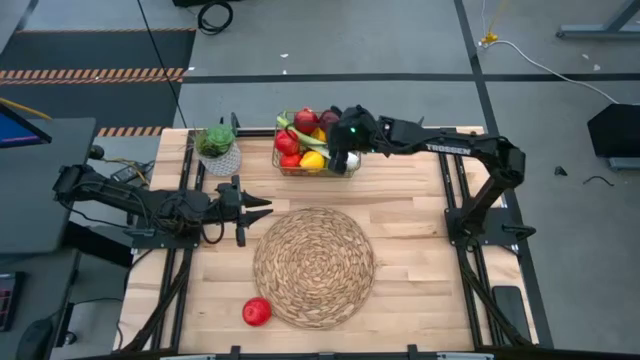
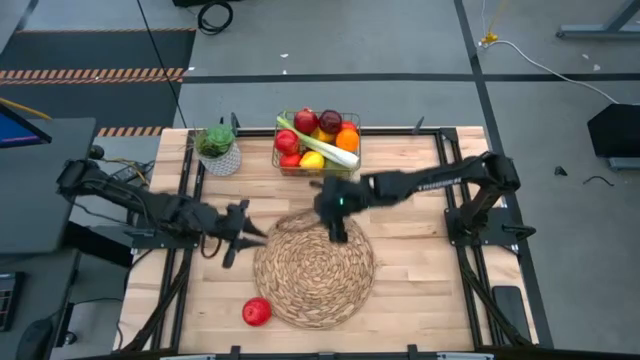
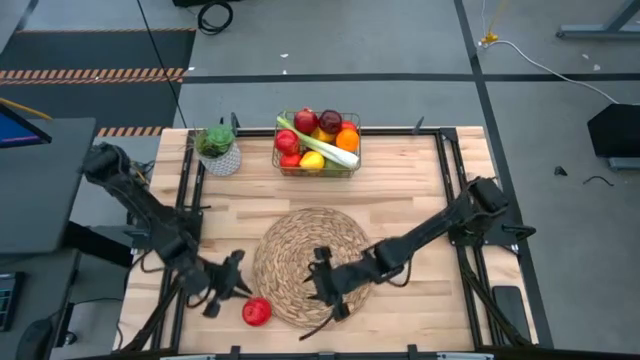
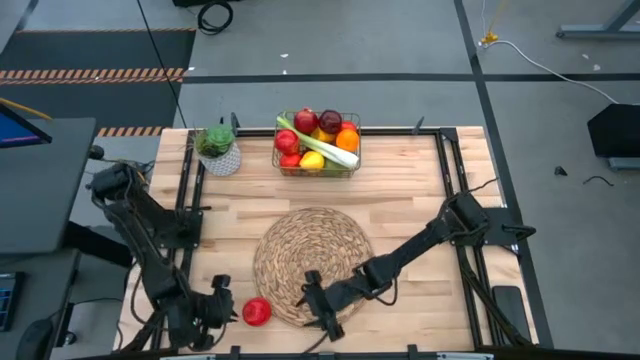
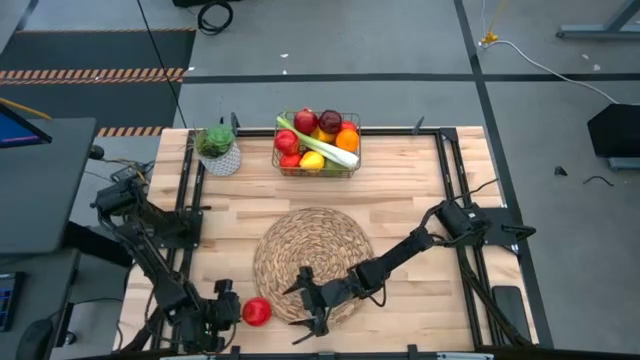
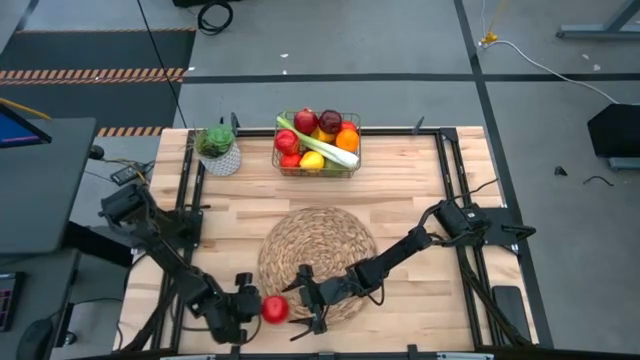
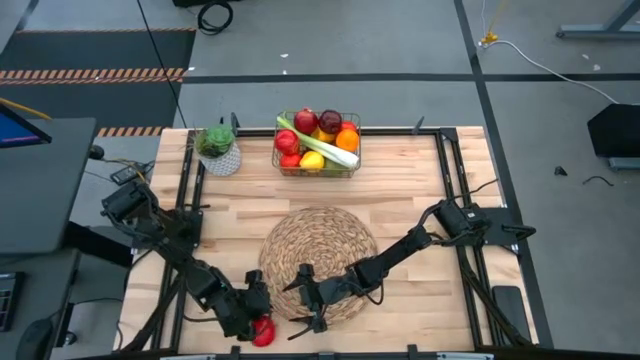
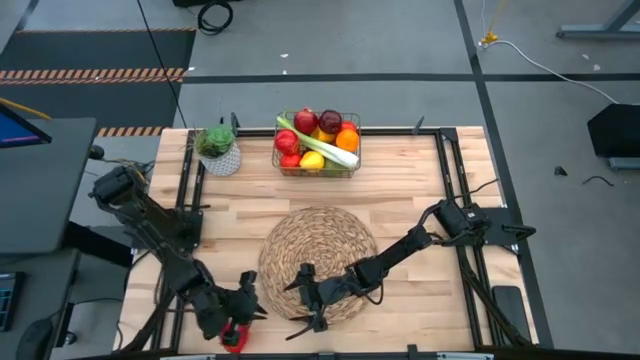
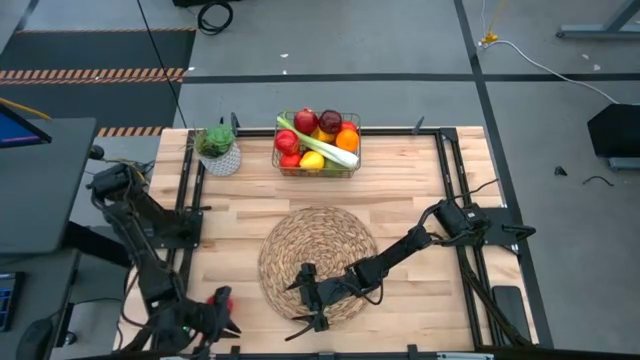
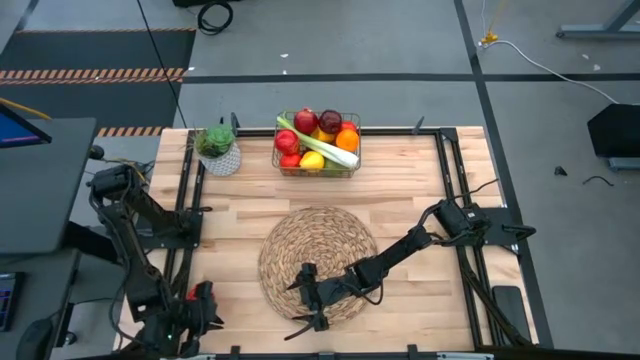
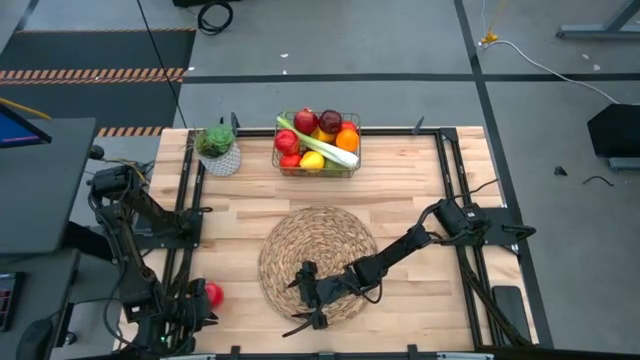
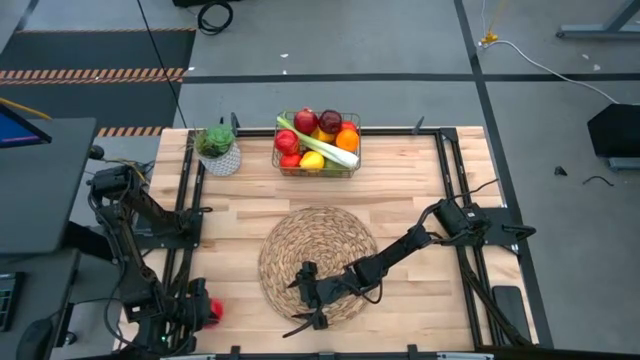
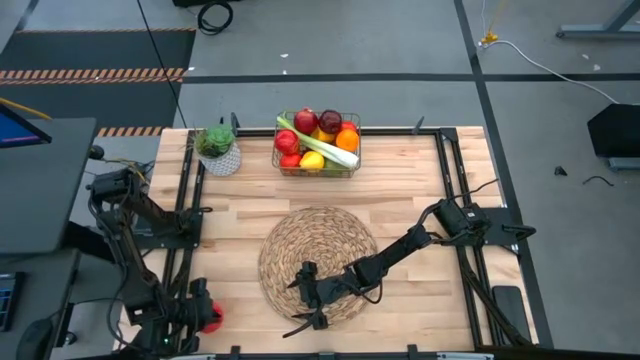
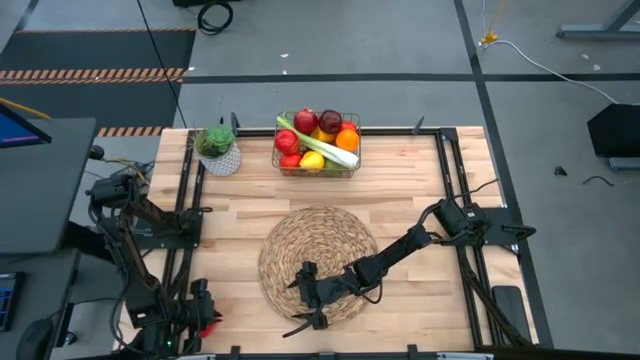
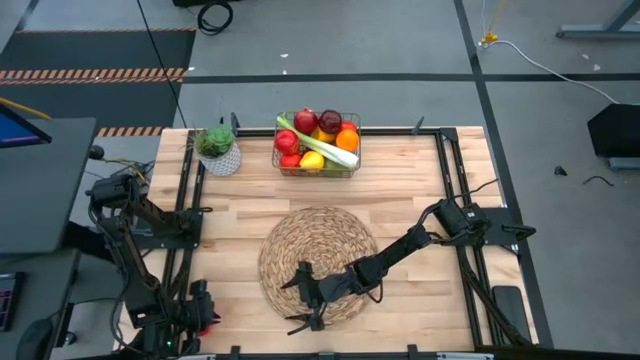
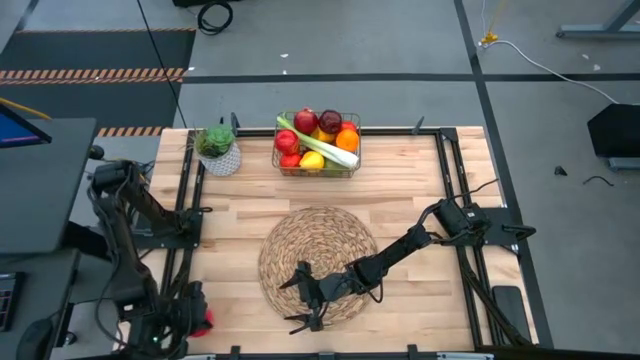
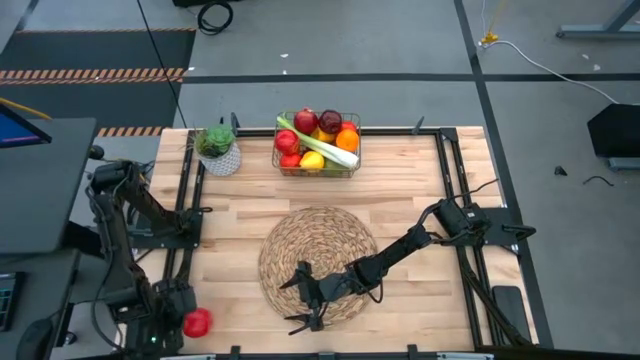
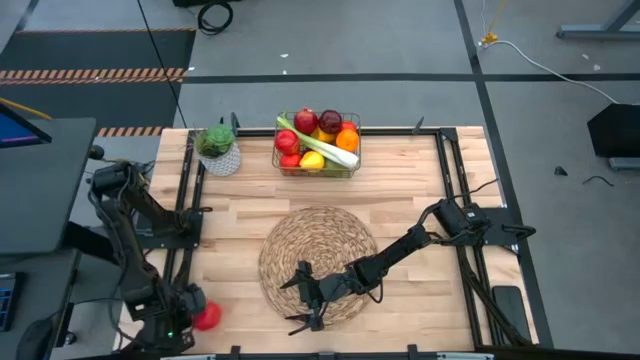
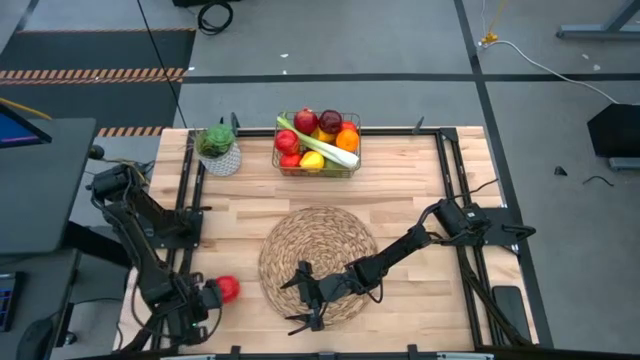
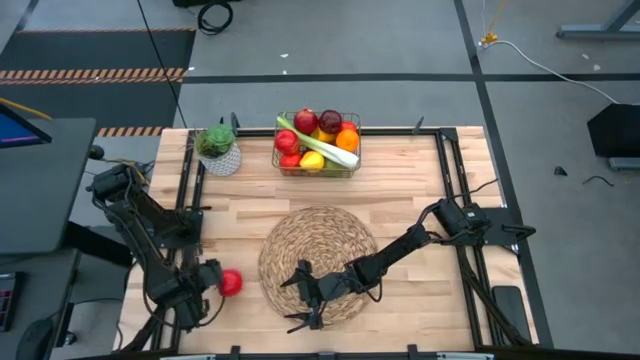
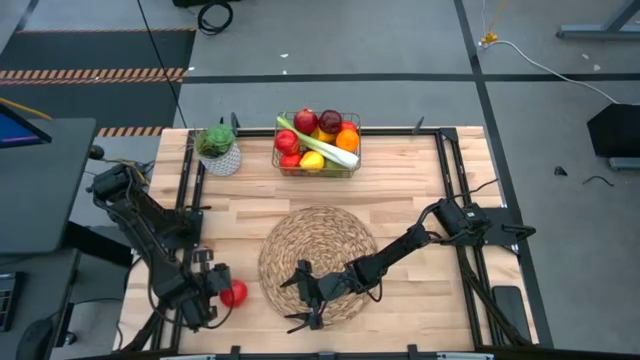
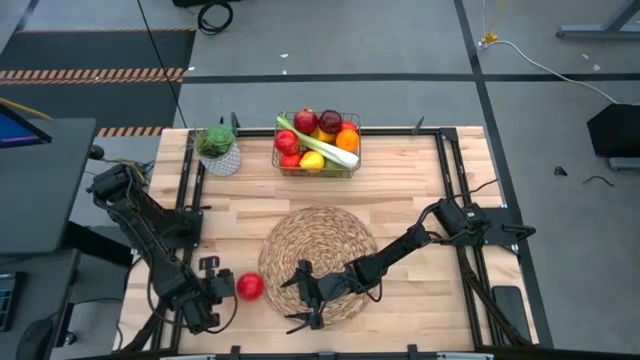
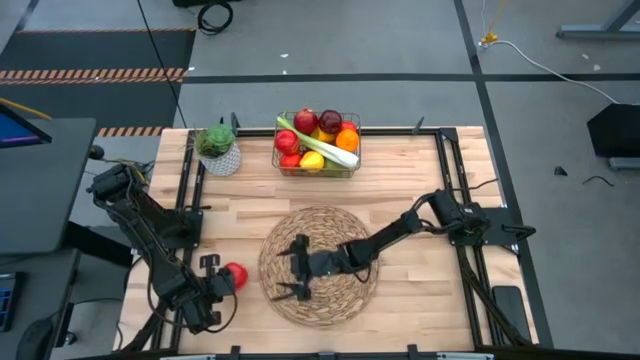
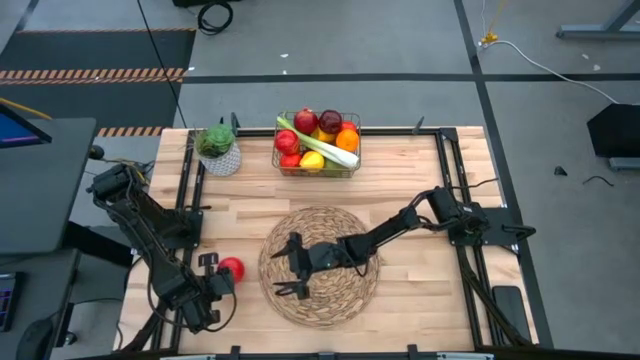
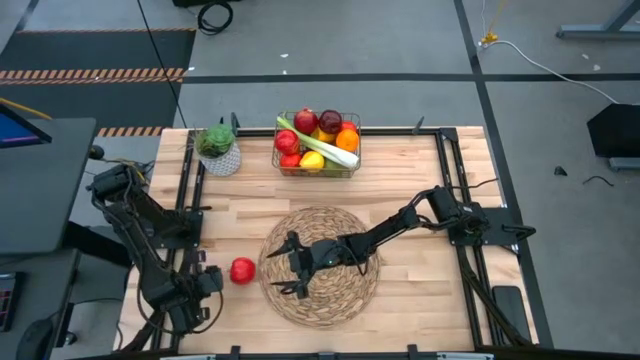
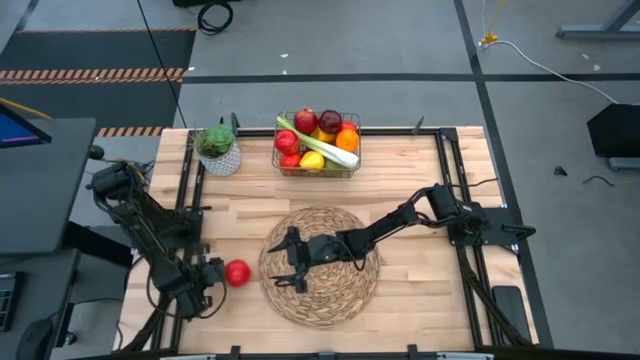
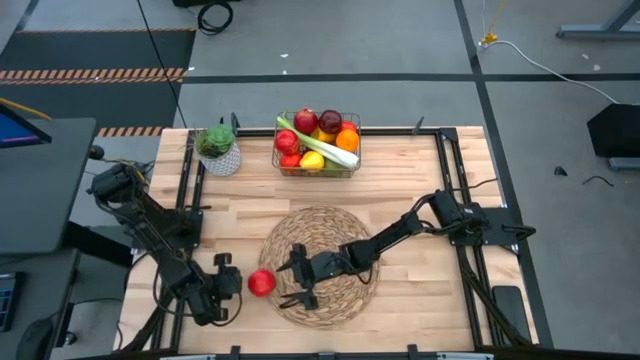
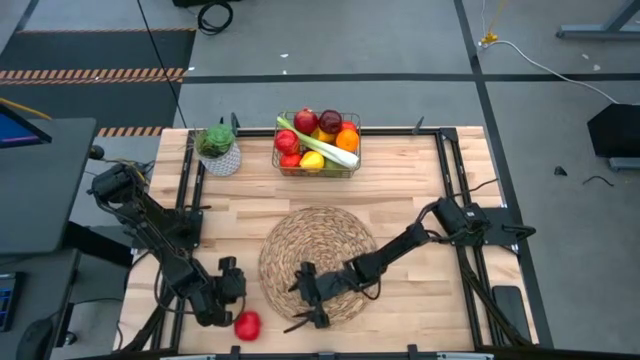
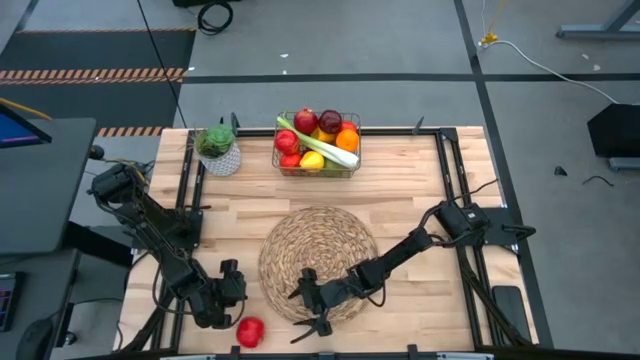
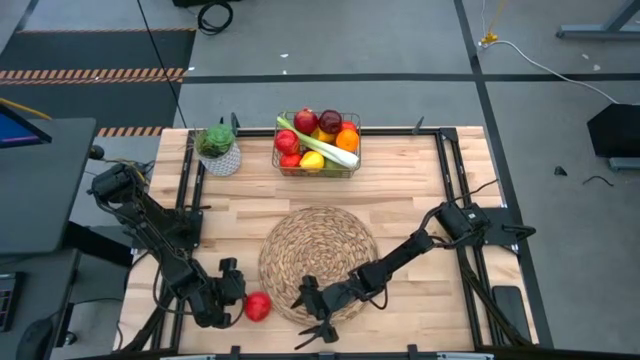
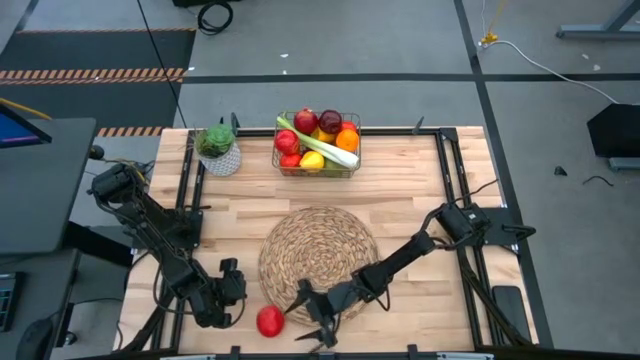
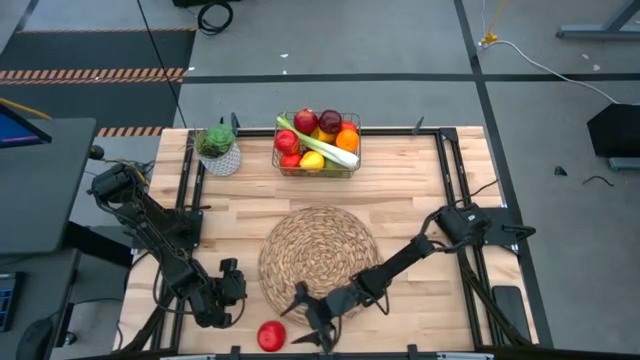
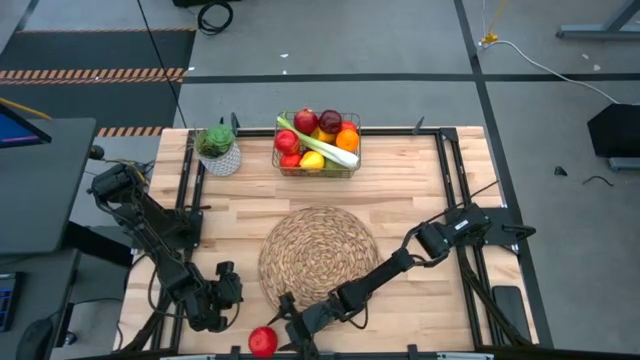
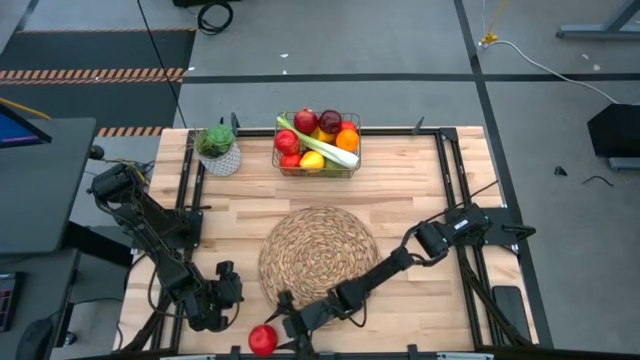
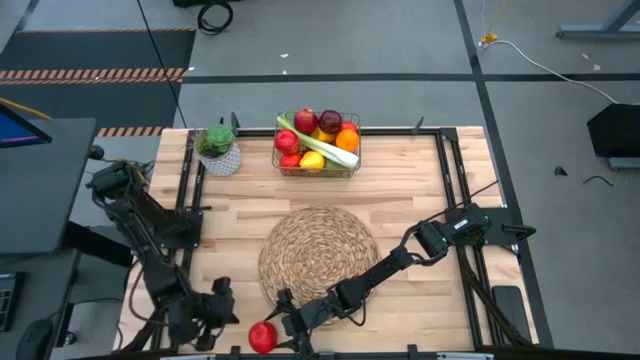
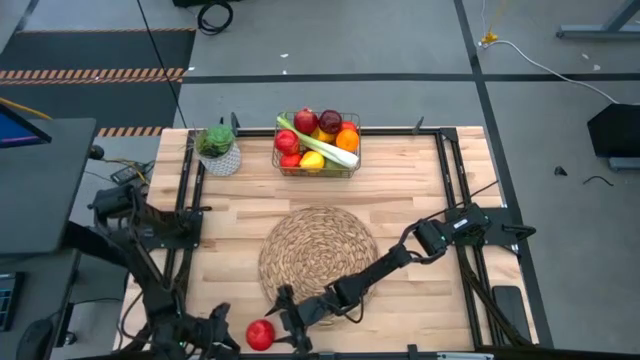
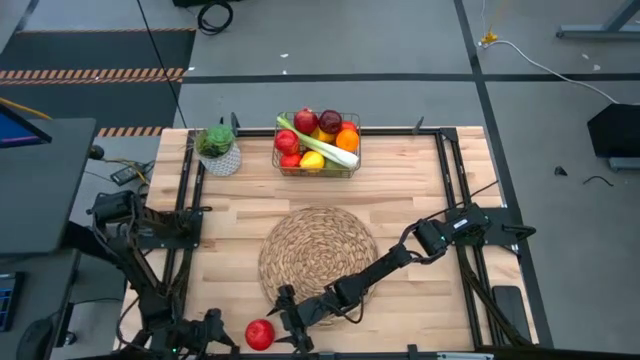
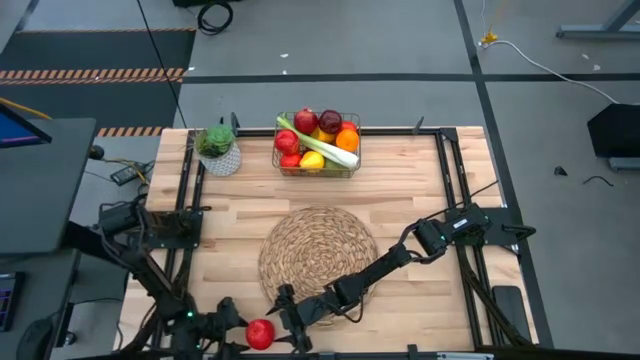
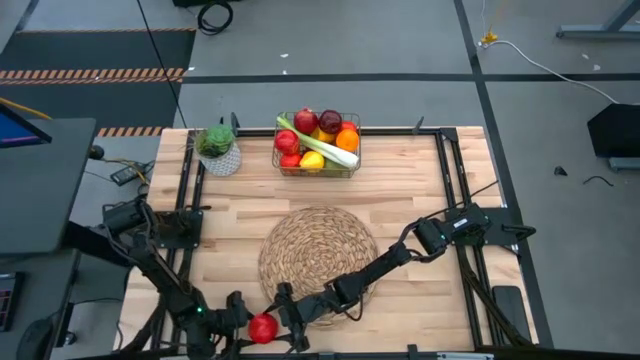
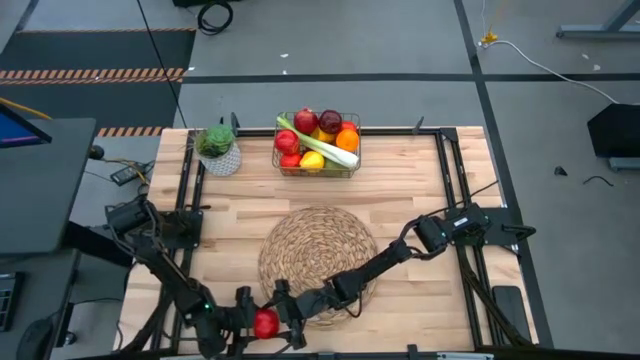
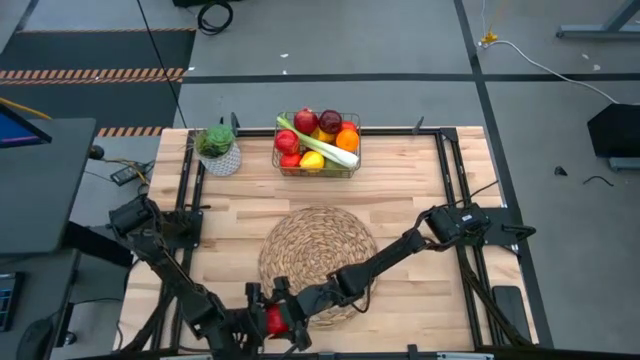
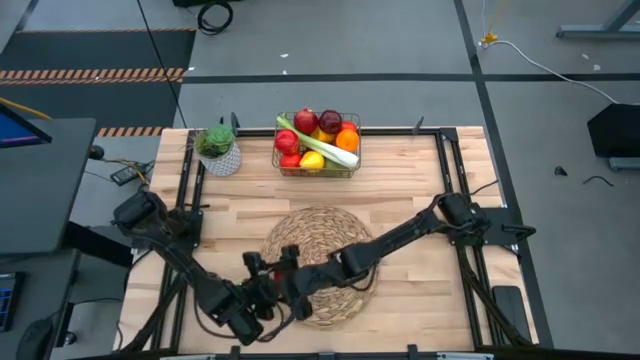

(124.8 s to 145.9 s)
Task: Build produce basket
Put the apple into the wire basket
